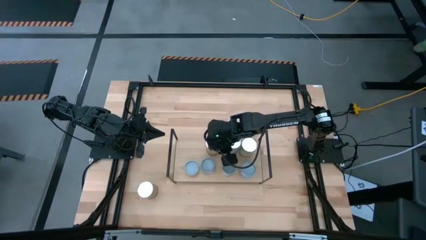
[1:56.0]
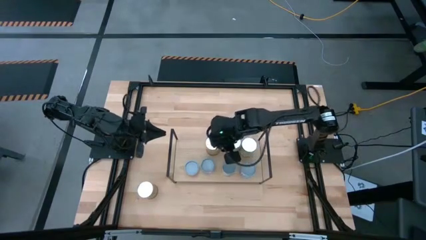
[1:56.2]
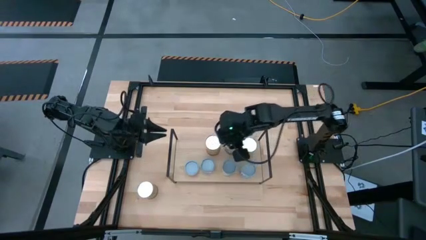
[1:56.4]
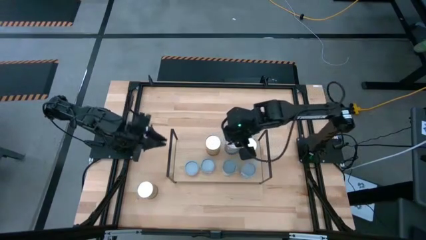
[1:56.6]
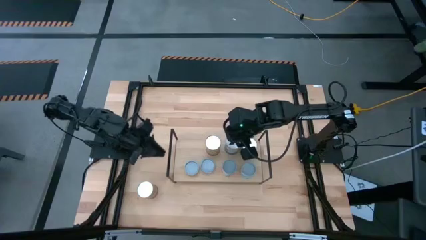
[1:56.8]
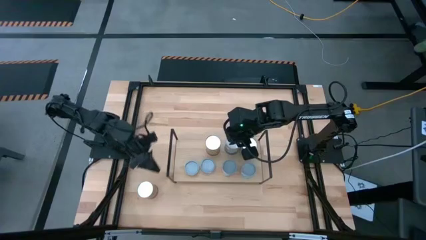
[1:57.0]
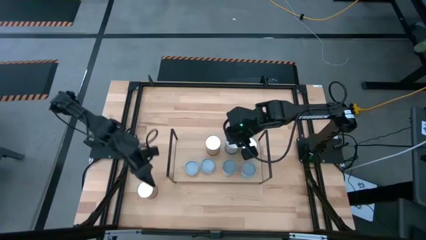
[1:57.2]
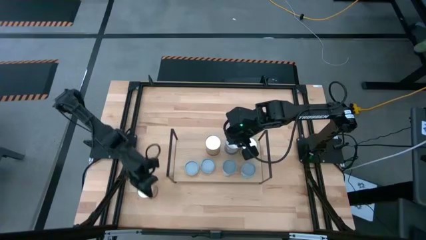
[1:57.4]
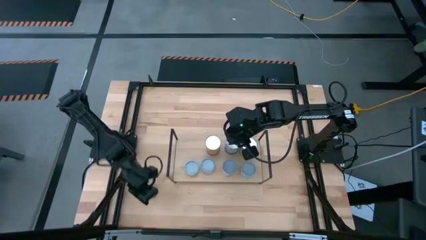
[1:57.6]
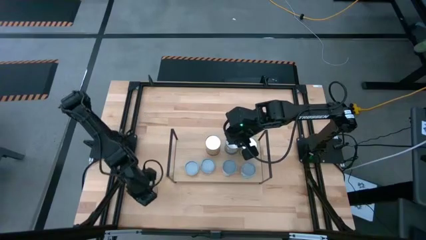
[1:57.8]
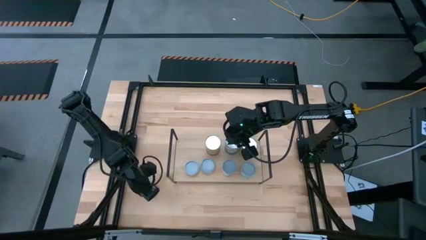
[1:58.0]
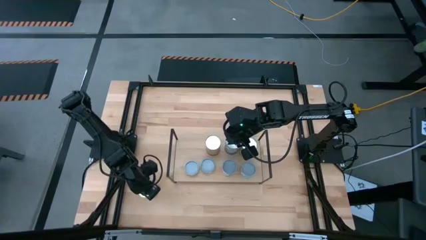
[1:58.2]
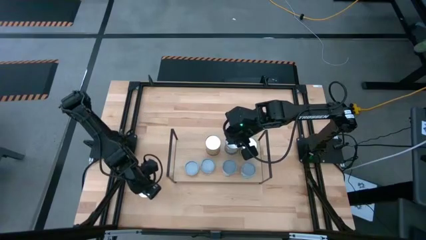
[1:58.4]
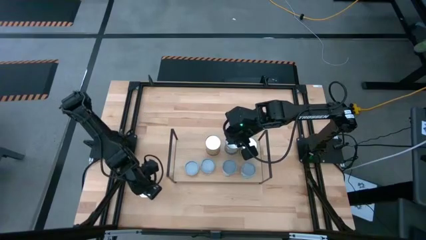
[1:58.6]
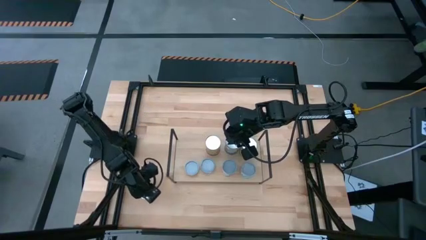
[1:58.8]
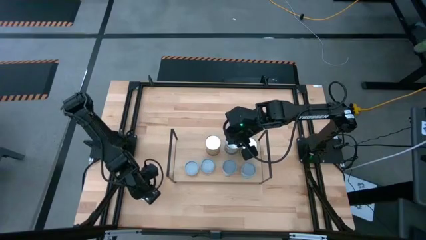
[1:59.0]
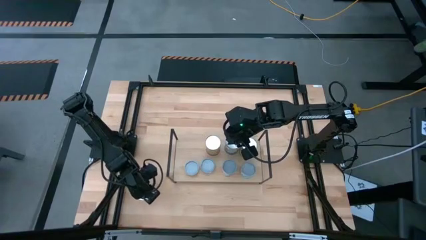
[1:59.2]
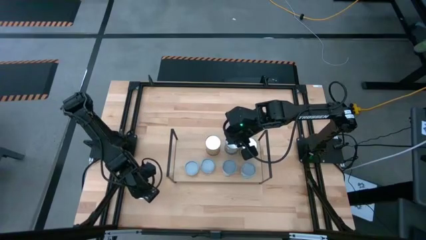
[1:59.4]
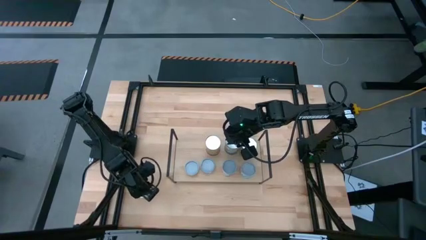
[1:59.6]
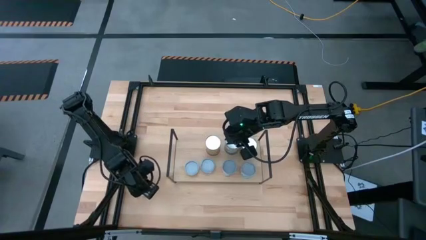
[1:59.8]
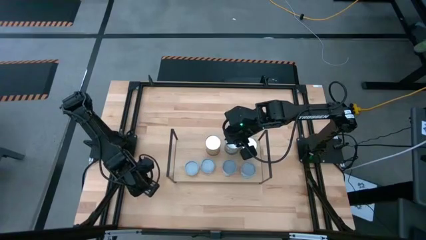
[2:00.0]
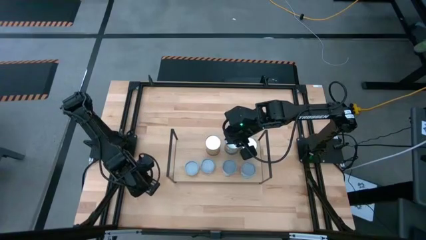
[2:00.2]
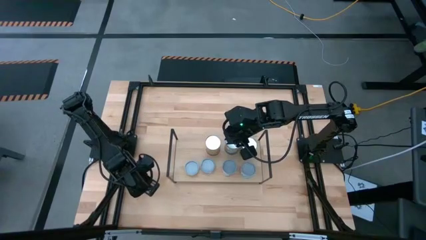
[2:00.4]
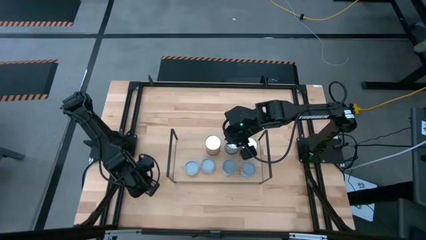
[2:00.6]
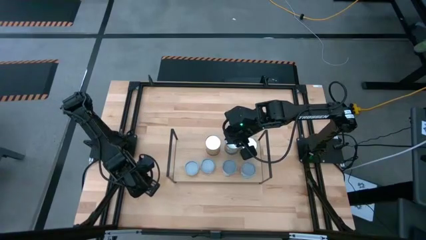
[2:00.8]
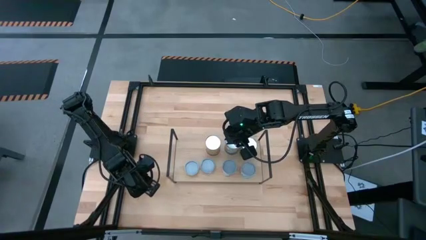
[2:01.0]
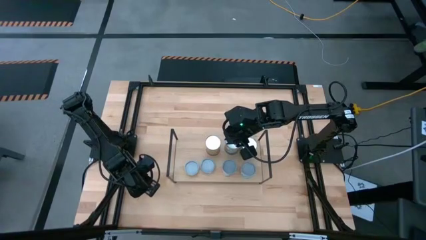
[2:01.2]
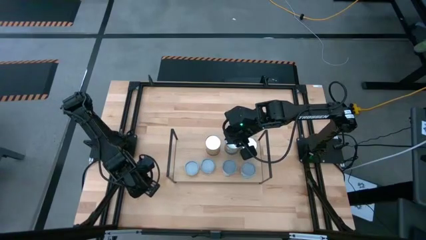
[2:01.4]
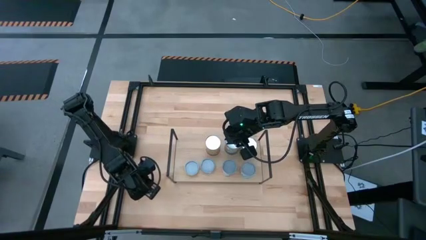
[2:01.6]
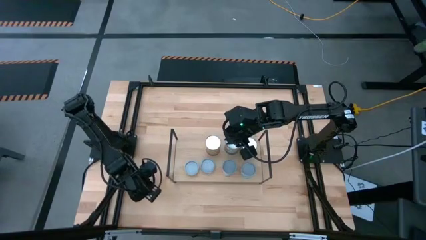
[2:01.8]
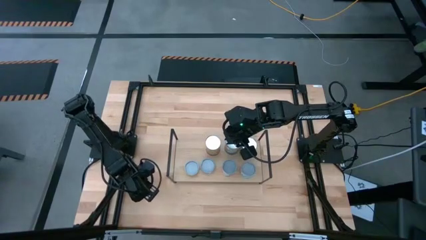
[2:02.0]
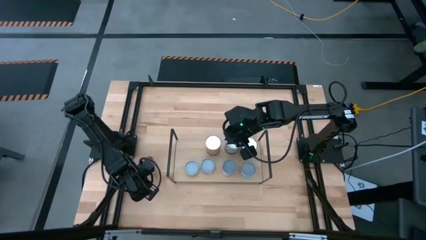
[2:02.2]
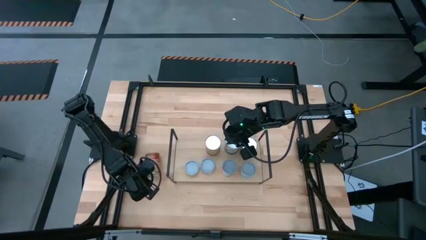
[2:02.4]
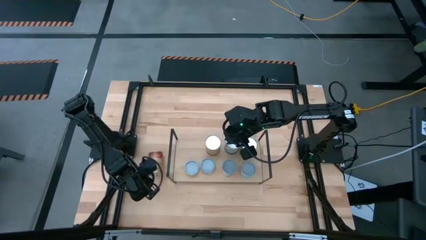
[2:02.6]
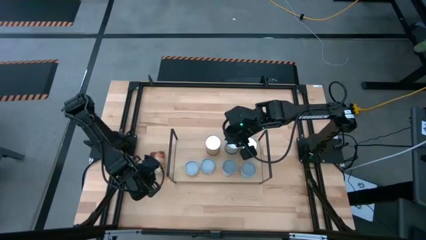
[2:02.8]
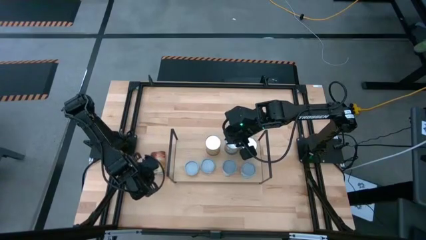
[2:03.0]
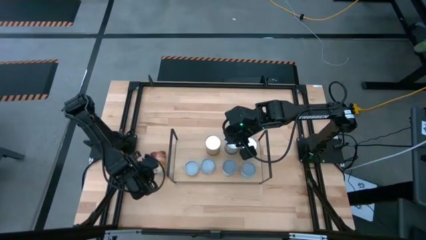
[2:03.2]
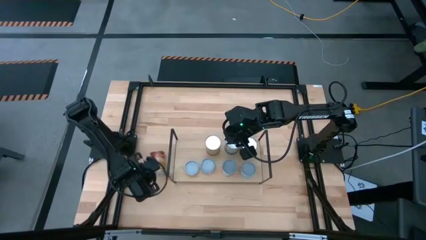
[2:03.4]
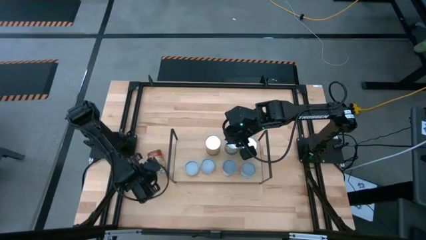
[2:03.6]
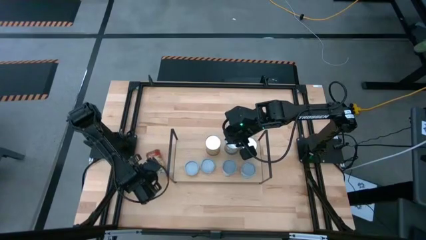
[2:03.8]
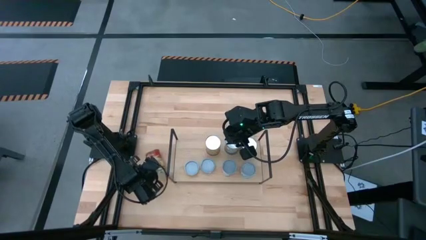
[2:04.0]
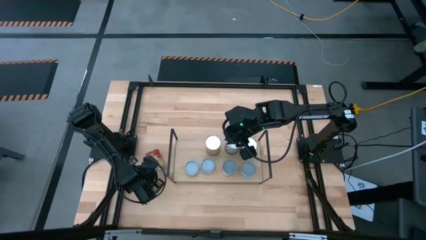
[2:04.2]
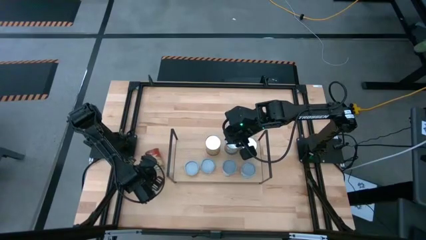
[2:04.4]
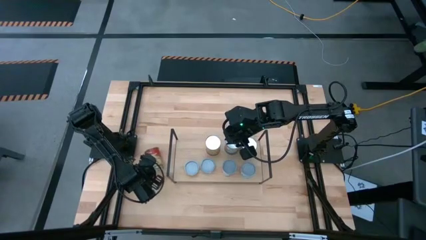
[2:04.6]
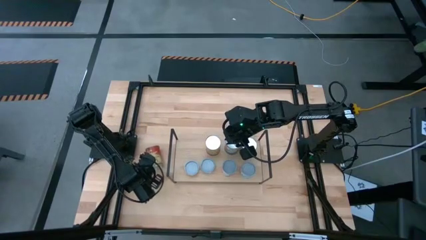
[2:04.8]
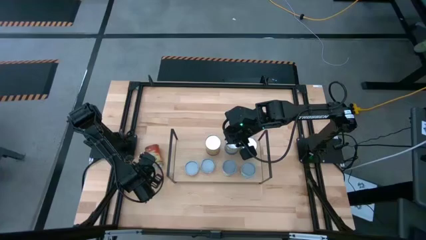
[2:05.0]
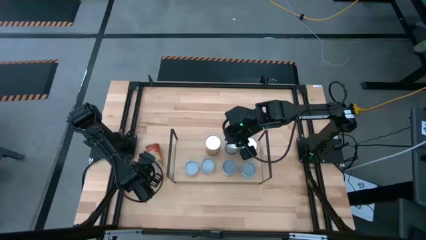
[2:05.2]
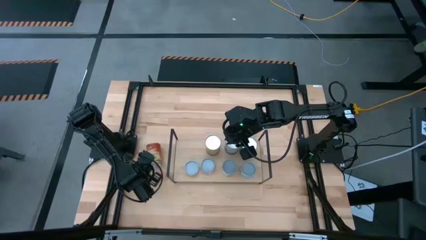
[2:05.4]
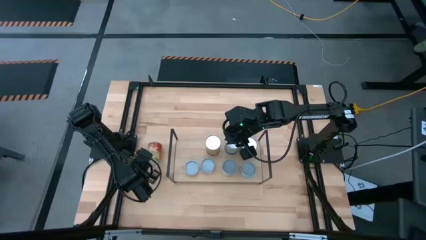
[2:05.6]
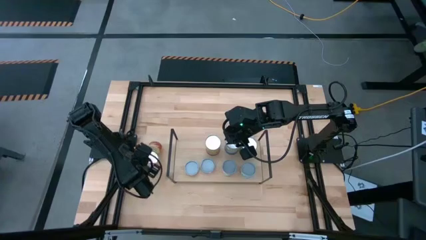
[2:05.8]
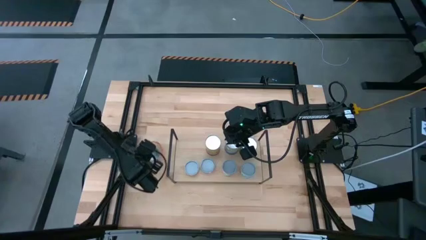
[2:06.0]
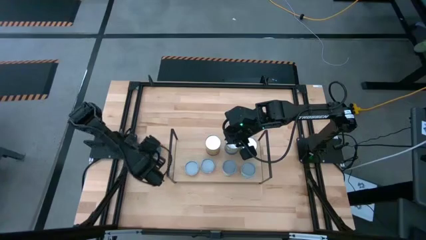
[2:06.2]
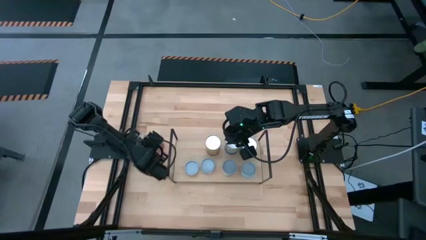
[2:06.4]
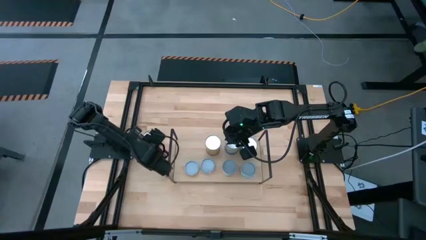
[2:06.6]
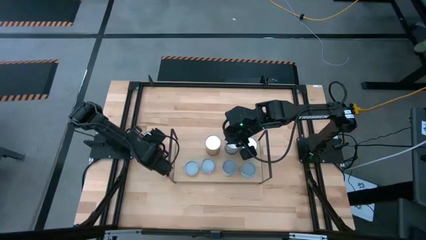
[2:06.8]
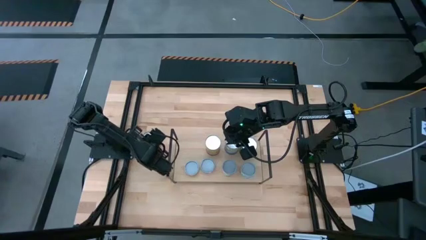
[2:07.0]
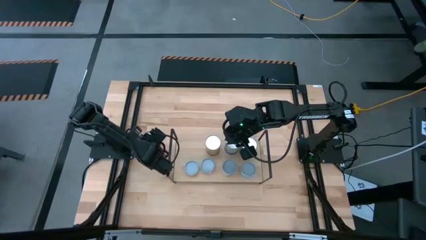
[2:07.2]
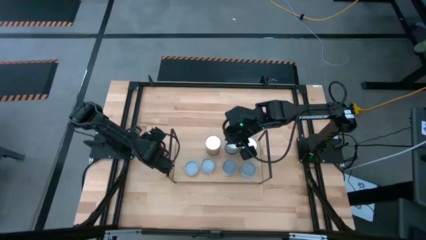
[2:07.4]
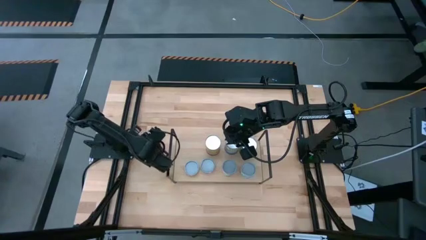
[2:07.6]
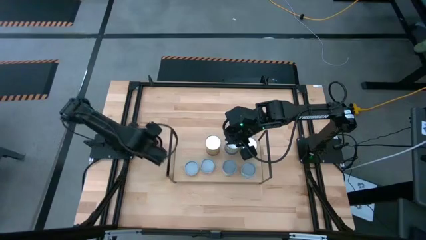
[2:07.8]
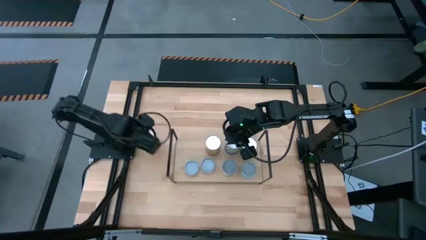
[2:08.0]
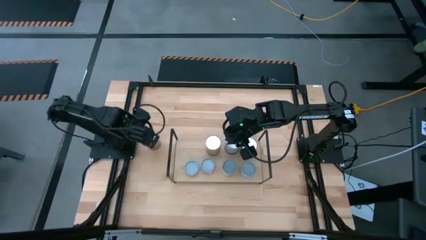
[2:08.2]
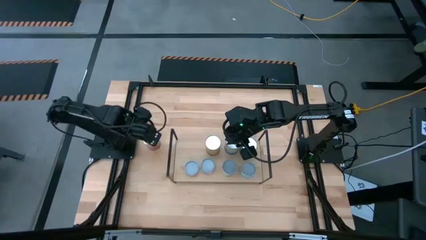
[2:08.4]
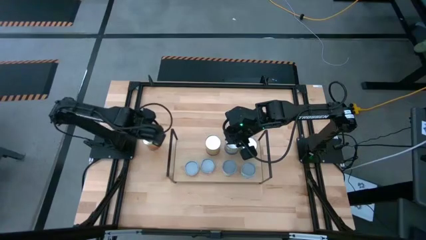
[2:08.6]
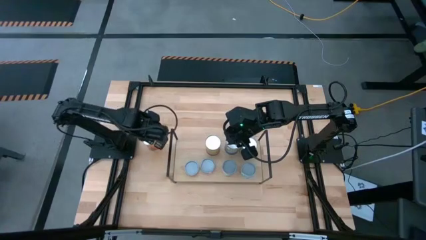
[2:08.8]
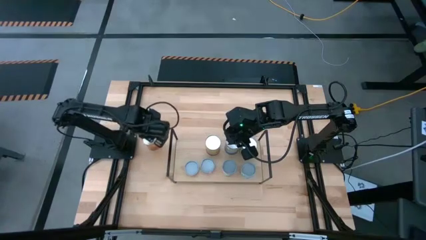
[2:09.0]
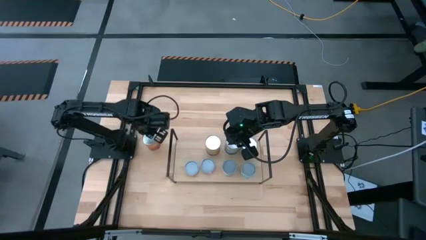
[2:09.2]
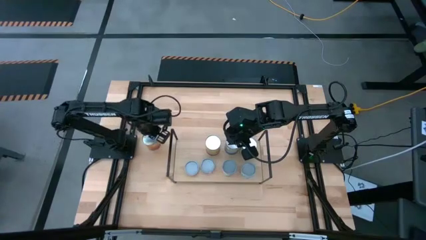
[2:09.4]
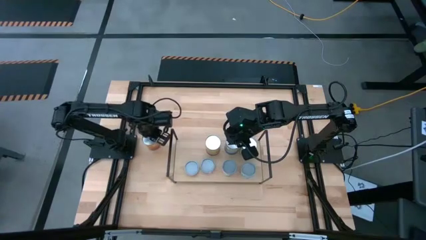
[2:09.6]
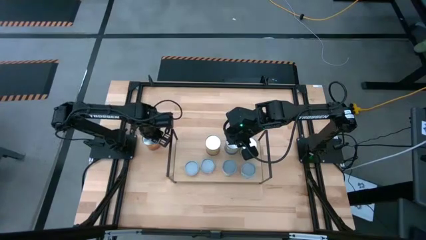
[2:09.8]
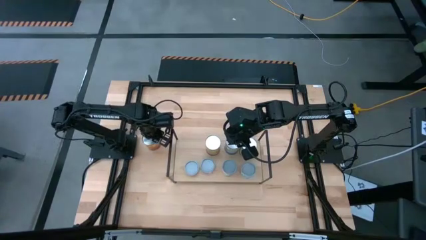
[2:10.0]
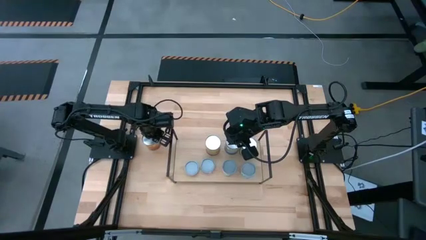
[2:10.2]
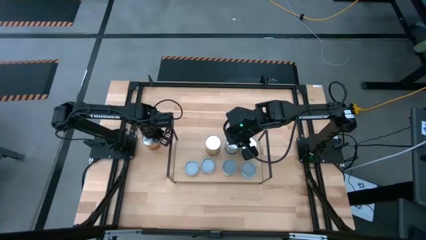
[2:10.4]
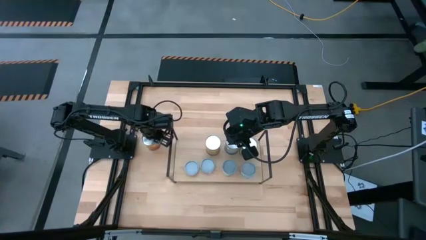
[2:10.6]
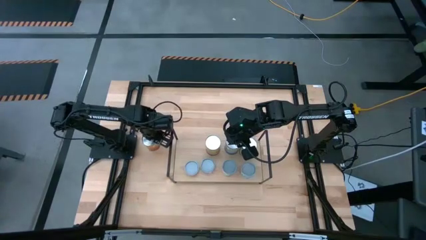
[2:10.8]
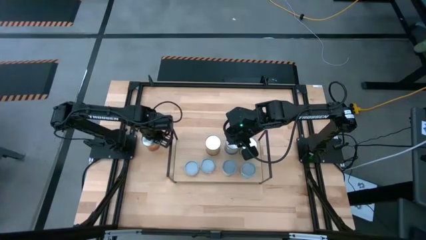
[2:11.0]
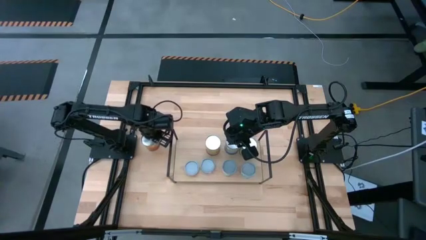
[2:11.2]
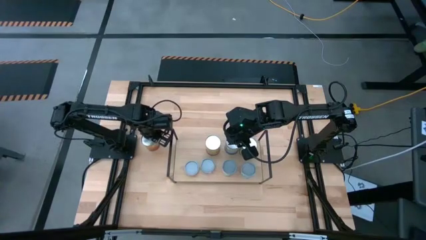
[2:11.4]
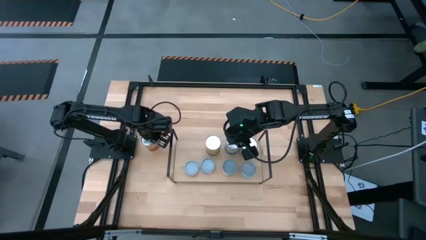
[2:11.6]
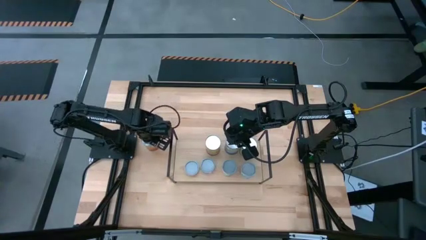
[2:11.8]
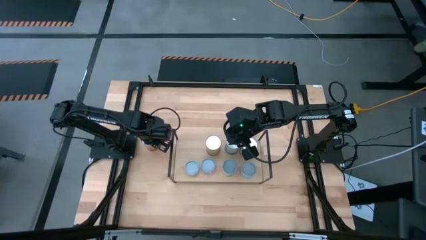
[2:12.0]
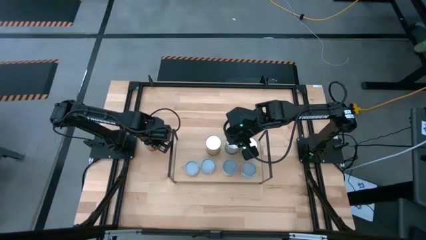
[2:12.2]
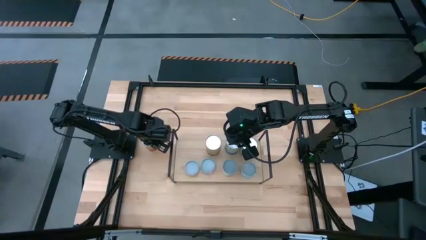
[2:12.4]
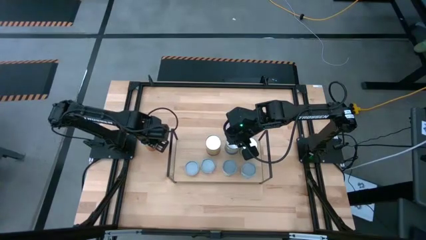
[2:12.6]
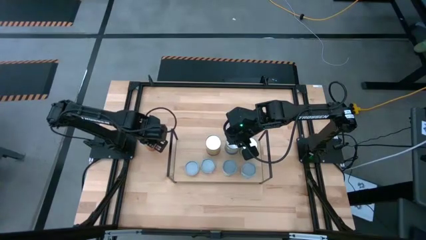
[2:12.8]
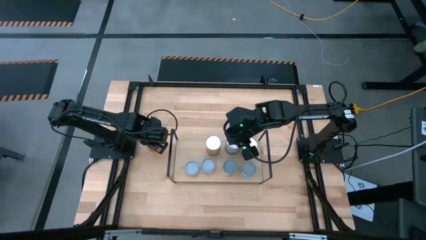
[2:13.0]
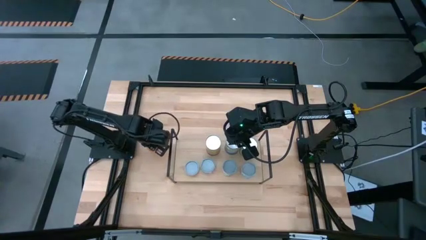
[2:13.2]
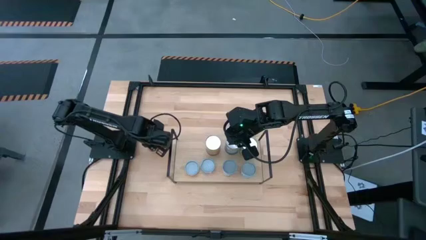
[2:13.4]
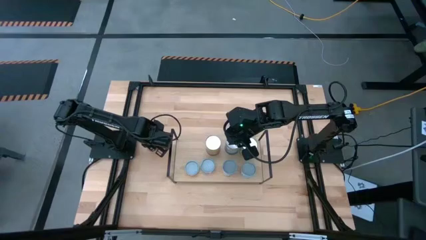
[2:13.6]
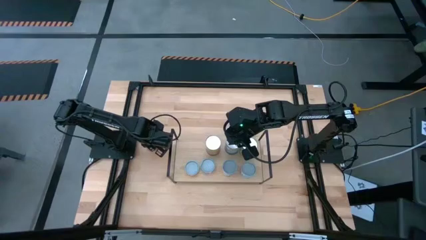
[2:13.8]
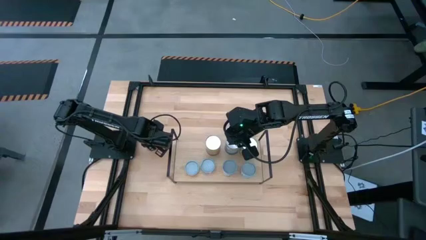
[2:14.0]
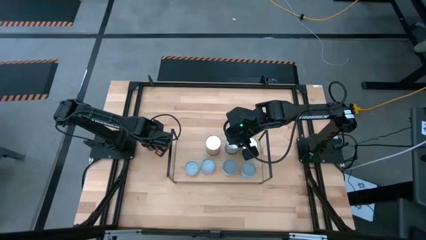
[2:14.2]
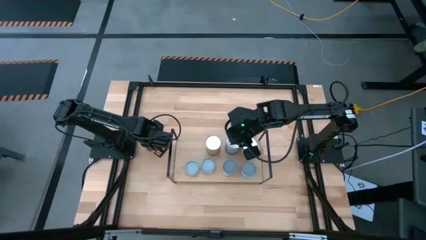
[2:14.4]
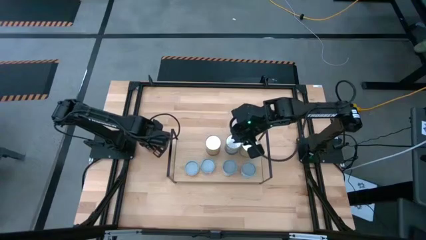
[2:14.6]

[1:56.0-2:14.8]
Task: Pick and place cans onto a shelf
Put the canned corns on the shelf
